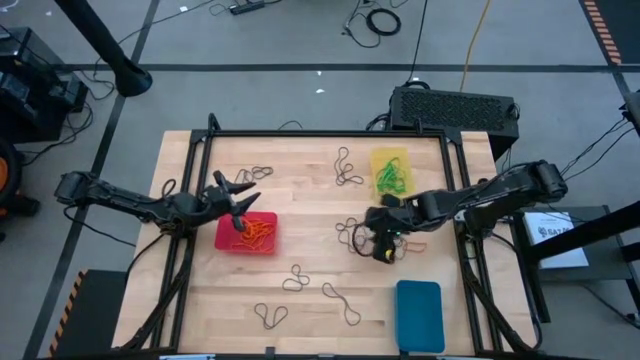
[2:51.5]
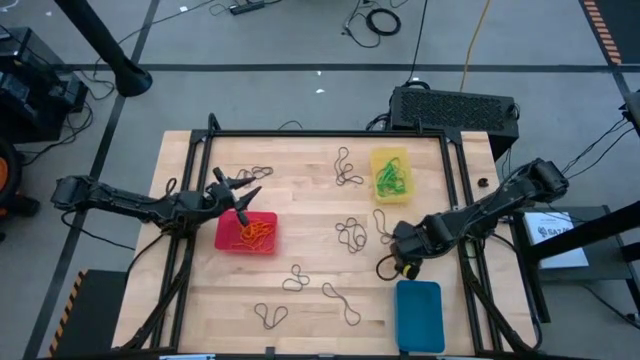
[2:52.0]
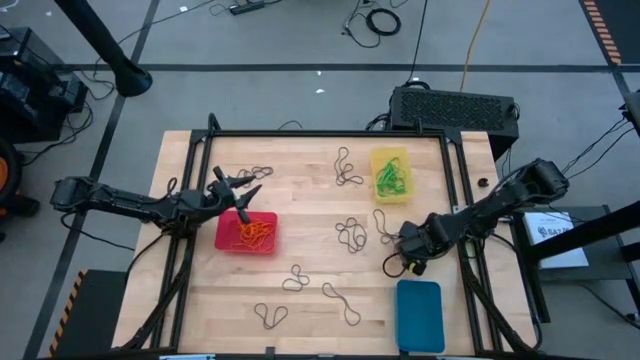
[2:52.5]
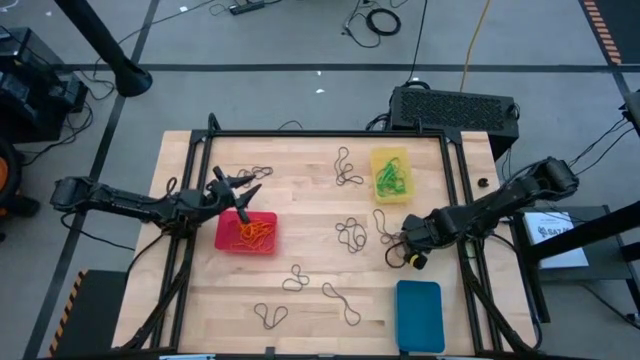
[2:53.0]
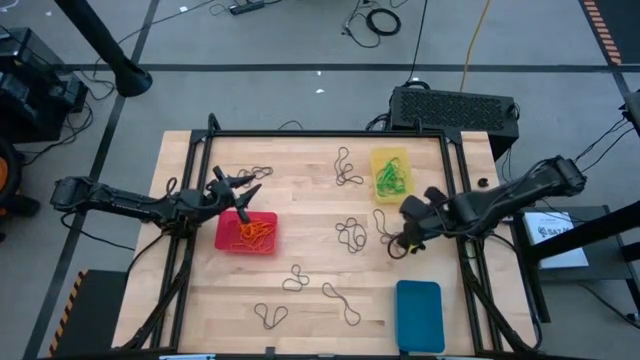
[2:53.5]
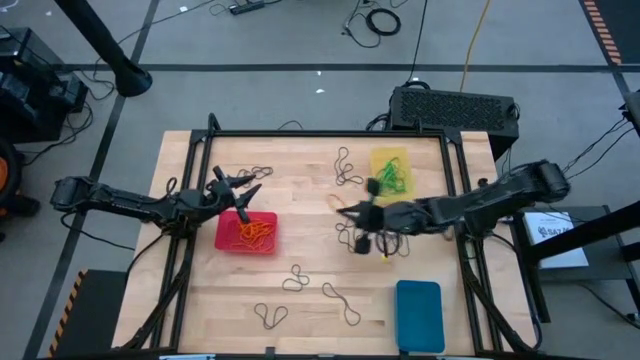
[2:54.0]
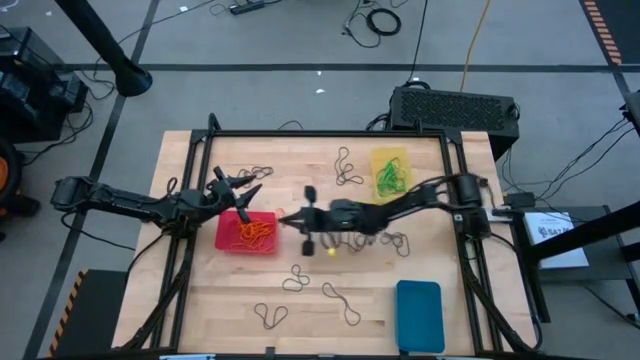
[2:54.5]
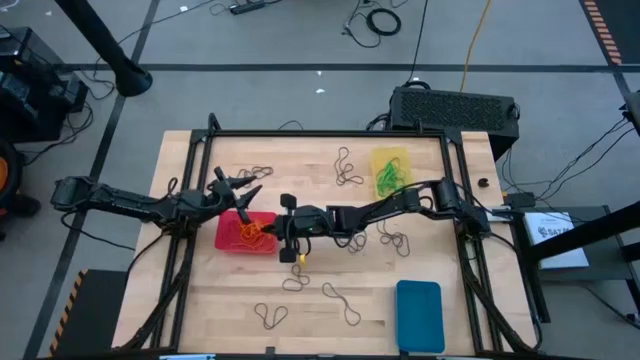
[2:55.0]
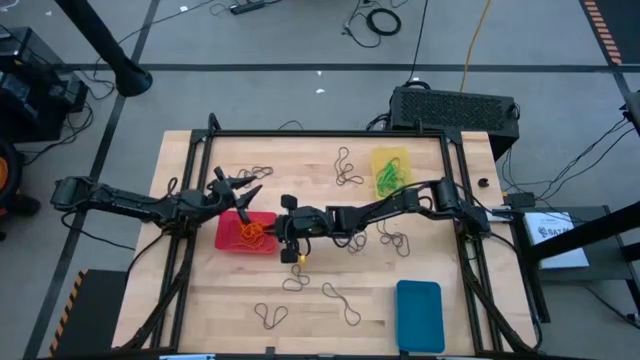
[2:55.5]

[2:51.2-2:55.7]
Task: Sort rubber bands into baskets
Put the orange rubber band into the pink bin

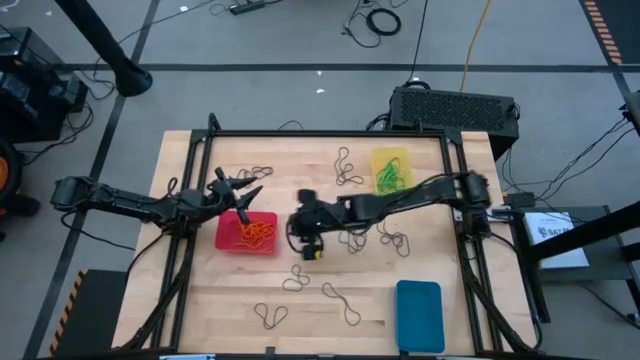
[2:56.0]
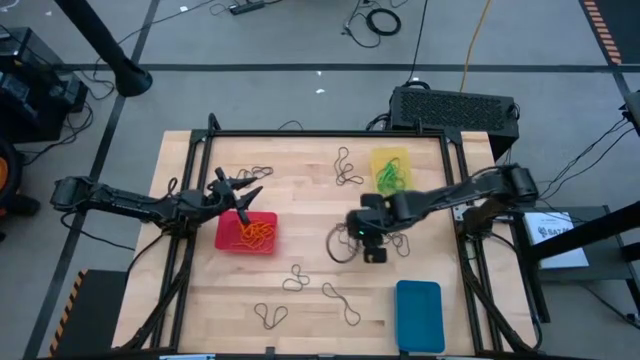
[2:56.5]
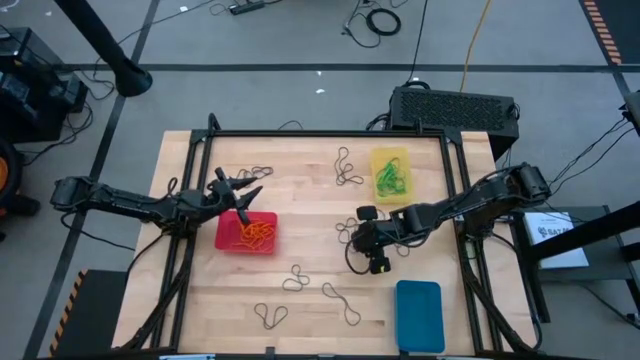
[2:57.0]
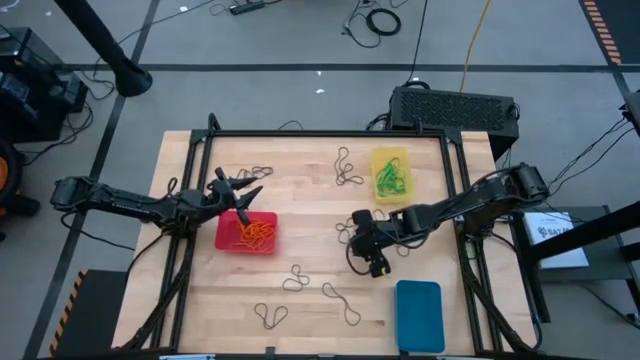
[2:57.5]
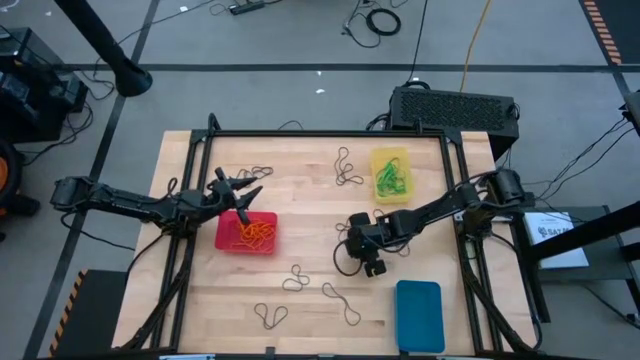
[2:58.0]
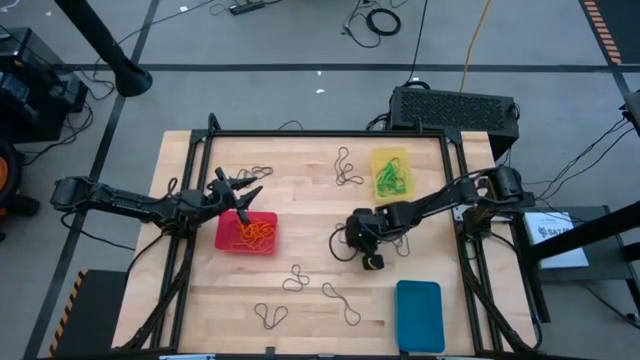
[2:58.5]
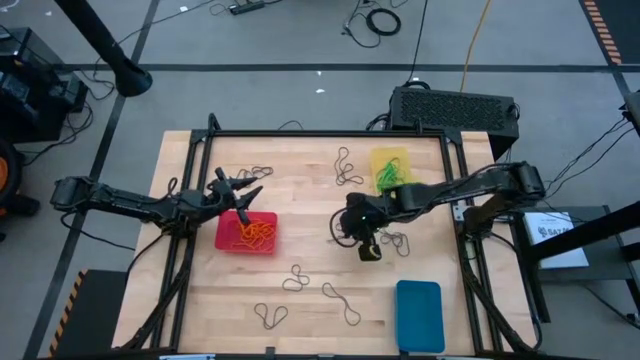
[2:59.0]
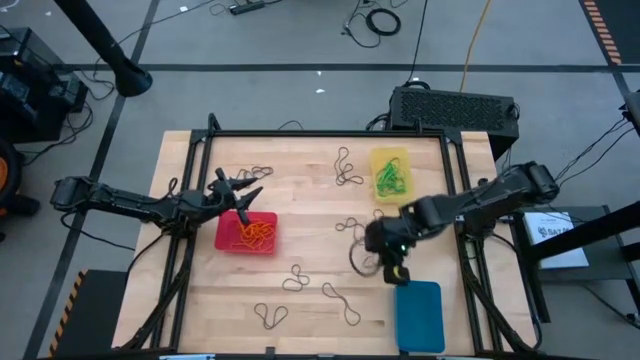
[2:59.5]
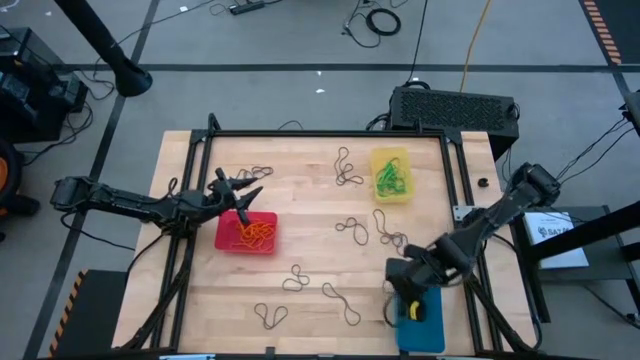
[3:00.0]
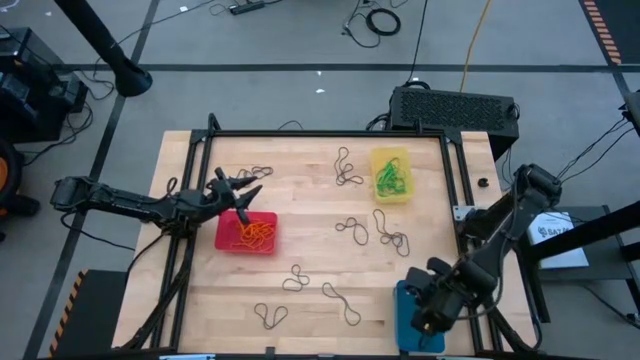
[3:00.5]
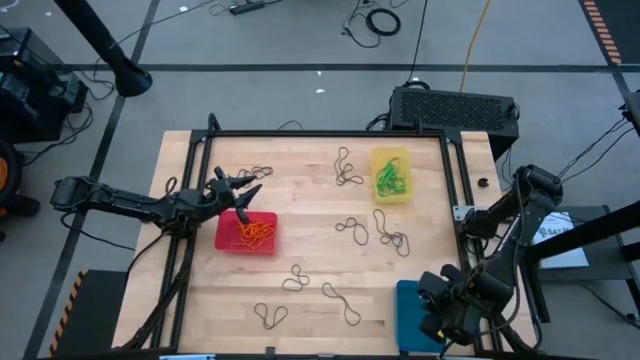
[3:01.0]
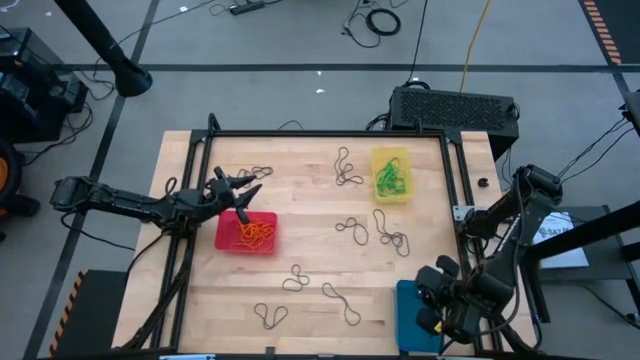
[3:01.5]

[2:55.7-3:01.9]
Put the violet rubber band into the blue bin

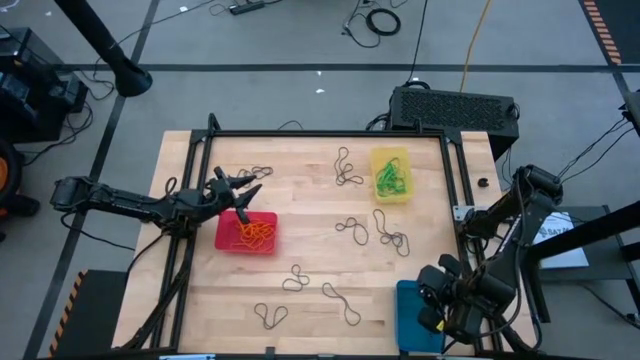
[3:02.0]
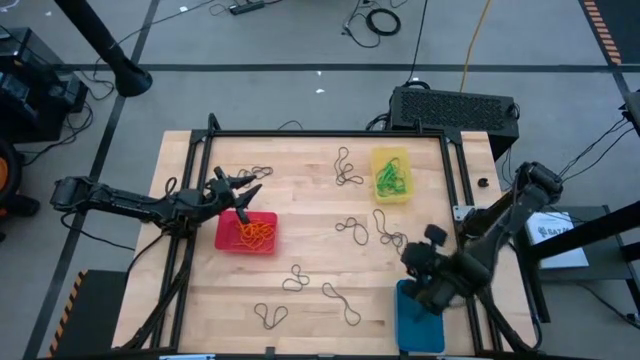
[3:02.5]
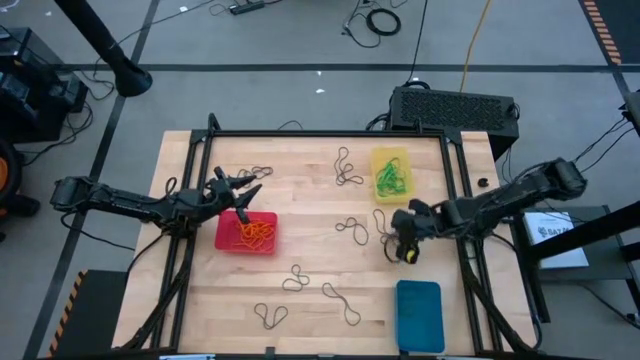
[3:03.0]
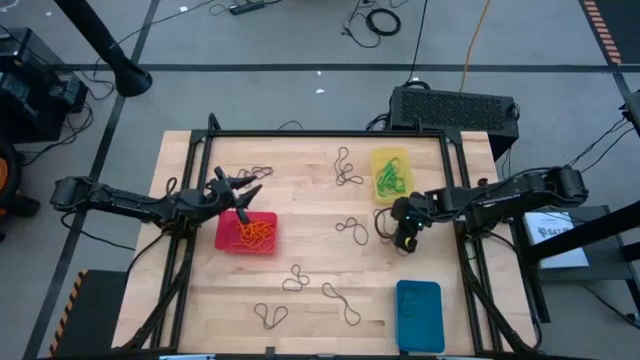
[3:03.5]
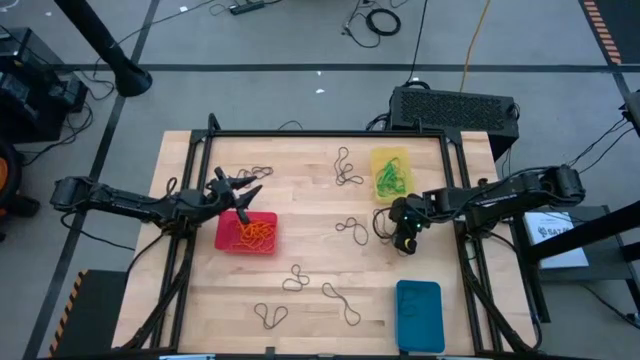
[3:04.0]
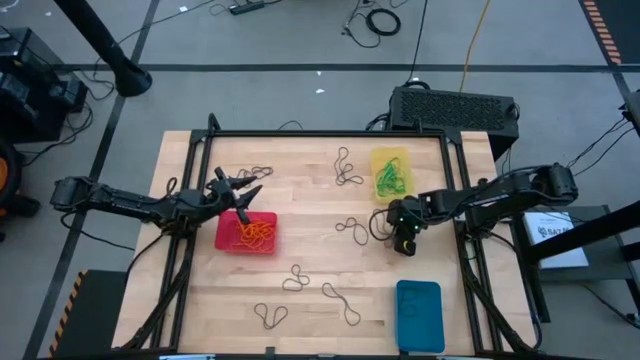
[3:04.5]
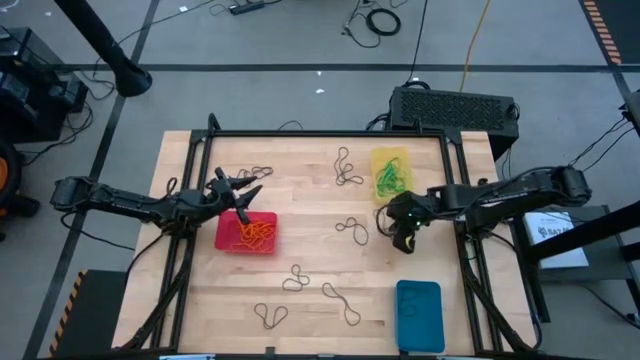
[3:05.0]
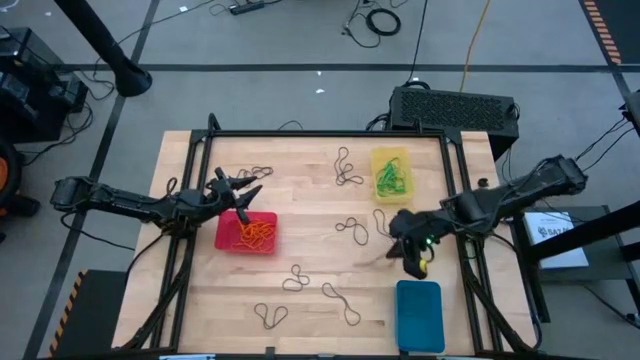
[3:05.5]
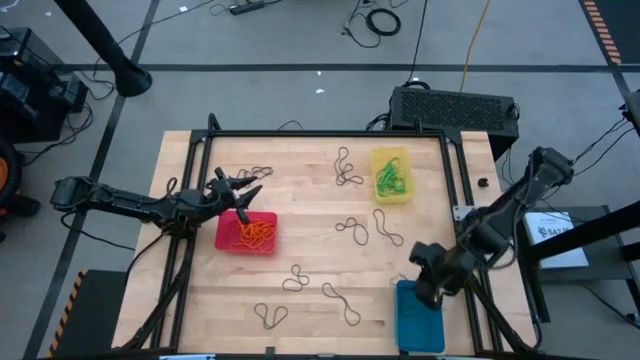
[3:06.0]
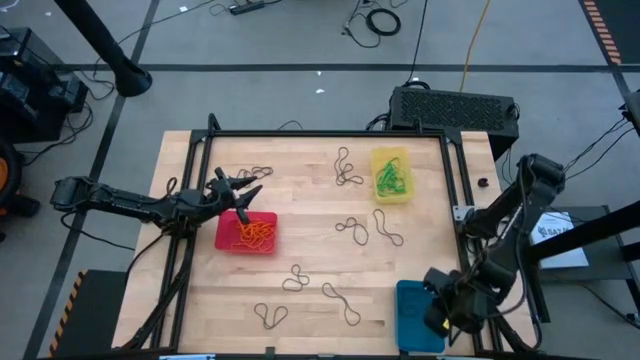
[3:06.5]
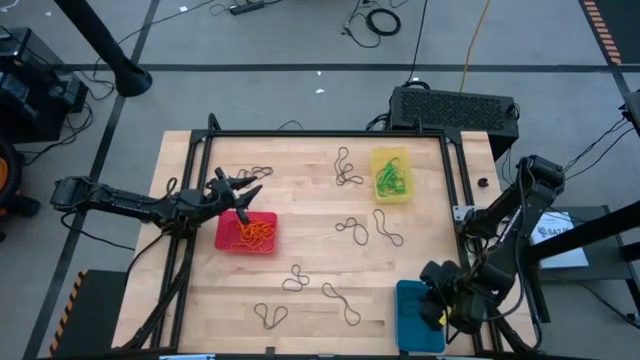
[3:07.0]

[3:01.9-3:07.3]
Put the violet rubber band into the blue bin

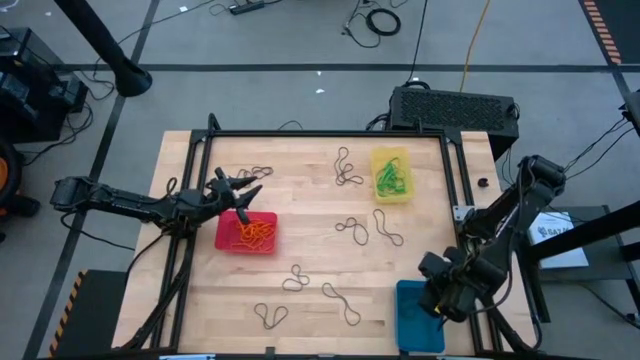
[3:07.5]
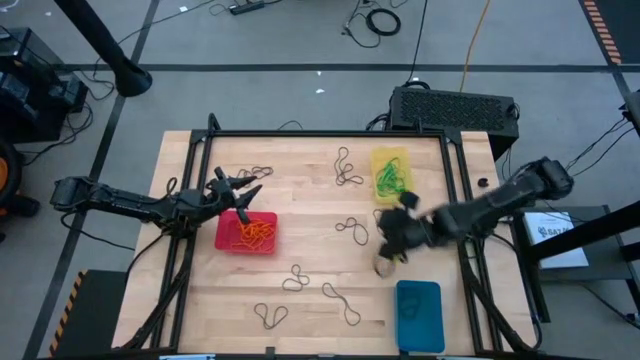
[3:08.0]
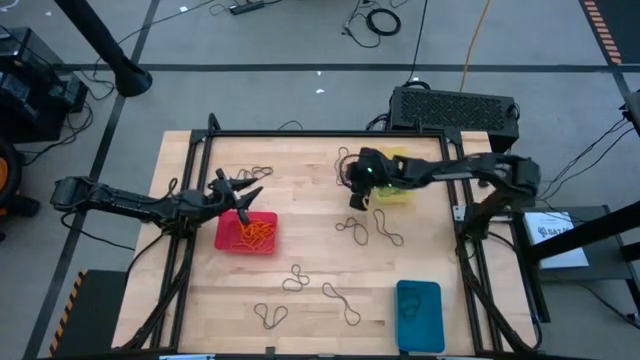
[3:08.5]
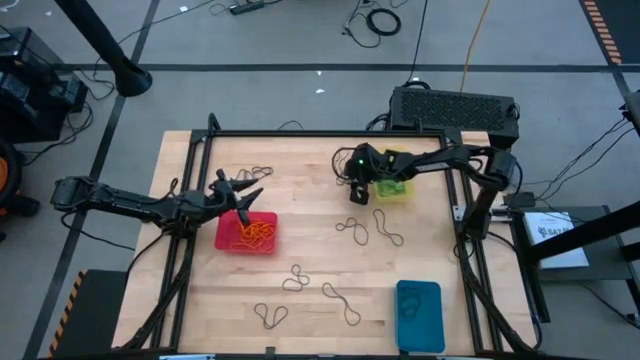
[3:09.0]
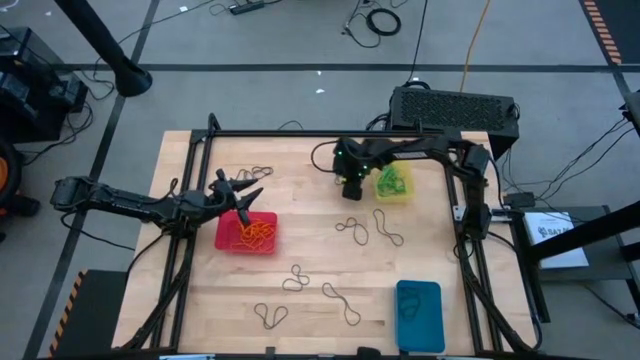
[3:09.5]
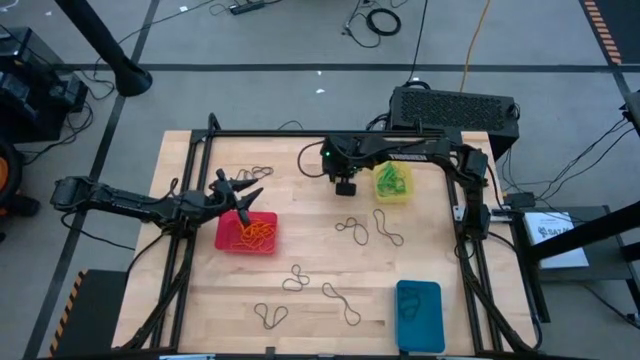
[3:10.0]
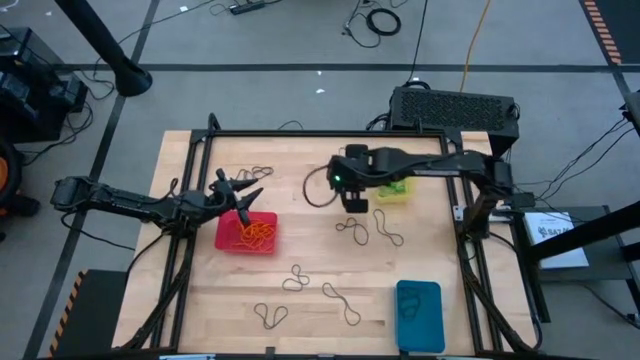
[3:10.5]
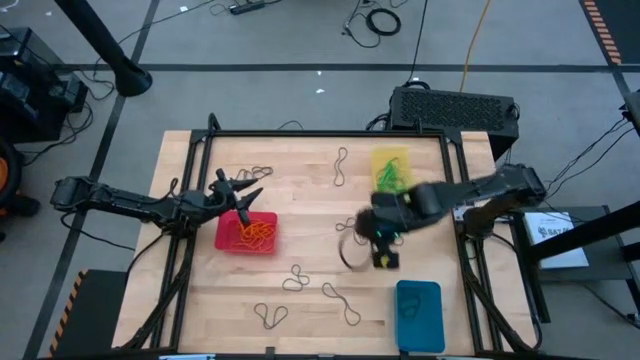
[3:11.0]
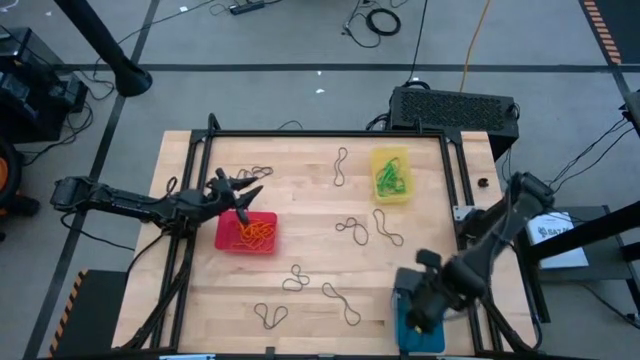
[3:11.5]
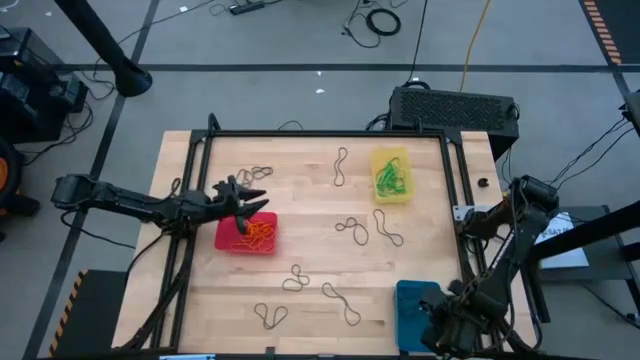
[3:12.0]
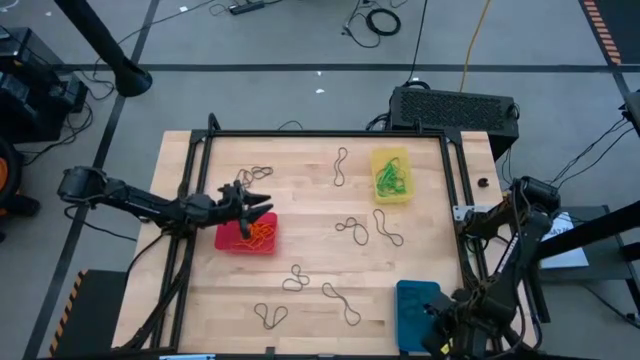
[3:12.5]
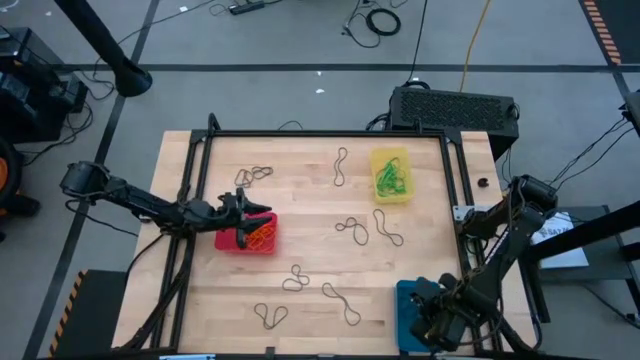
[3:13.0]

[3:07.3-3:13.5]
Put the violet rubber band into the blue bin
